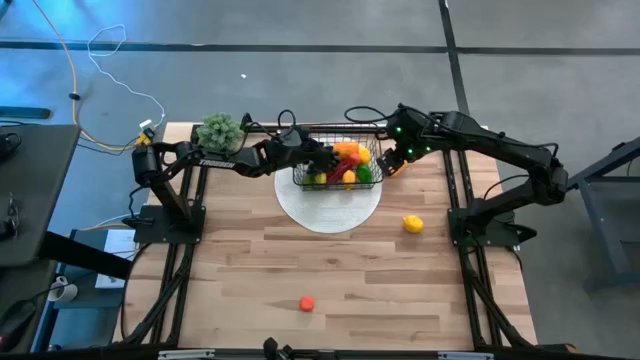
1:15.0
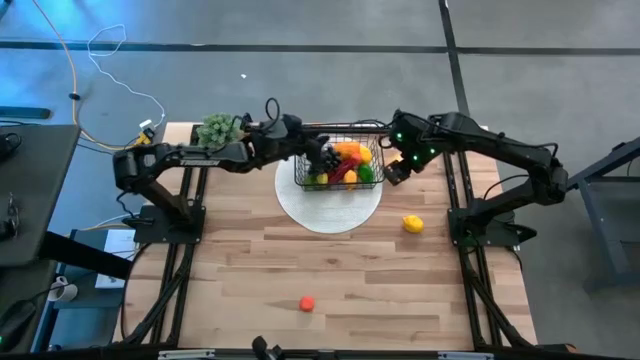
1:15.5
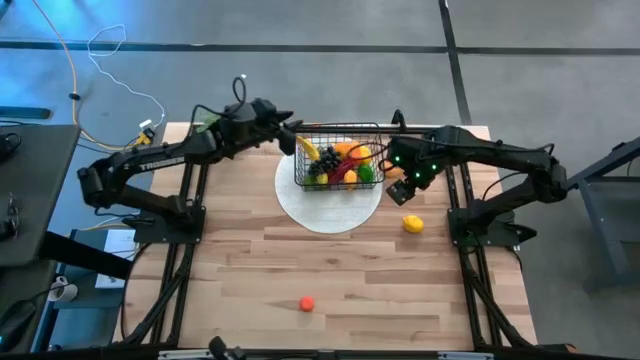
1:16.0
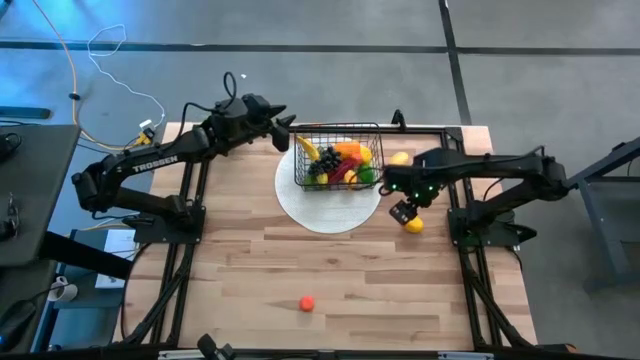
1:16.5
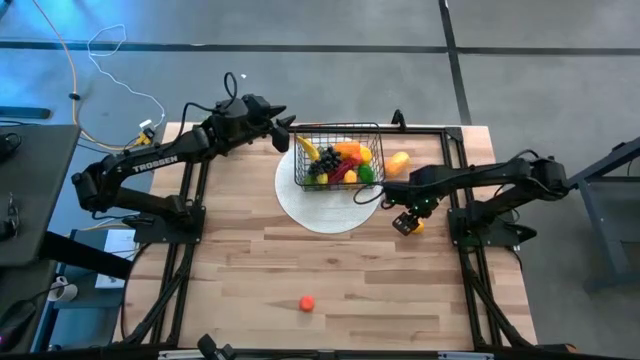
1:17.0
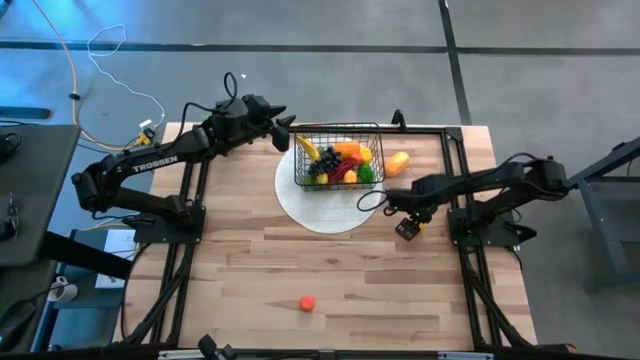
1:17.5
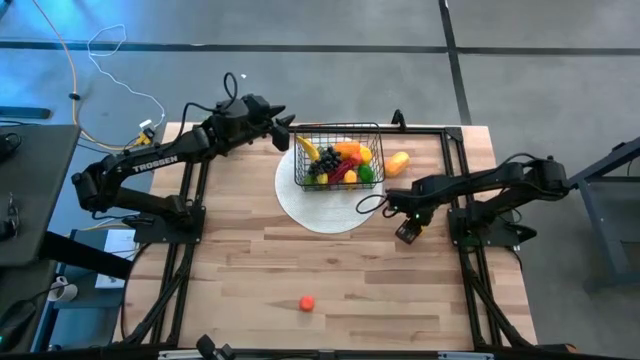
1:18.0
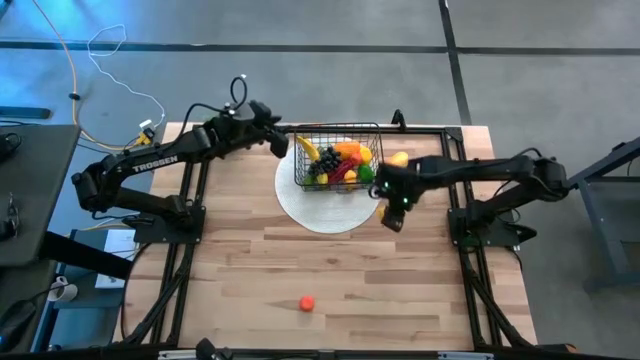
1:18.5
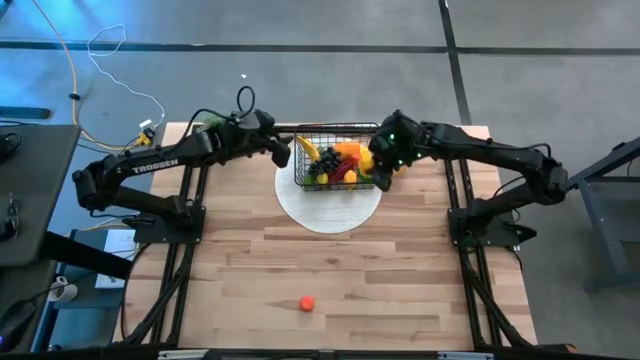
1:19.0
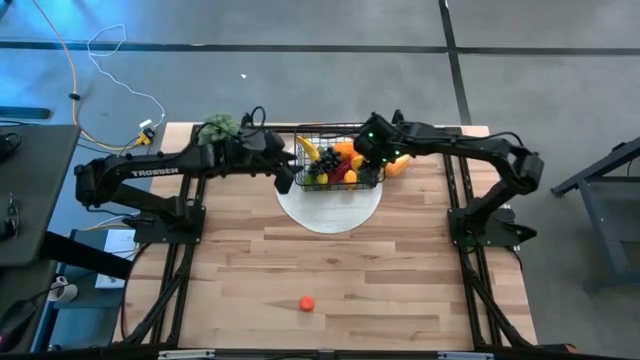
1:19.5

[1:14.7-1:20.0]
Task: Build produce basket
Put the yellow lemon into the black wire basket

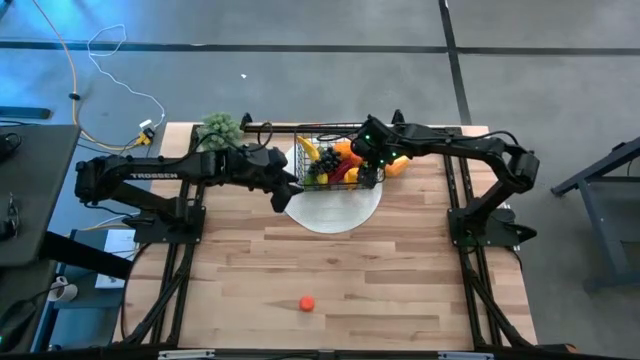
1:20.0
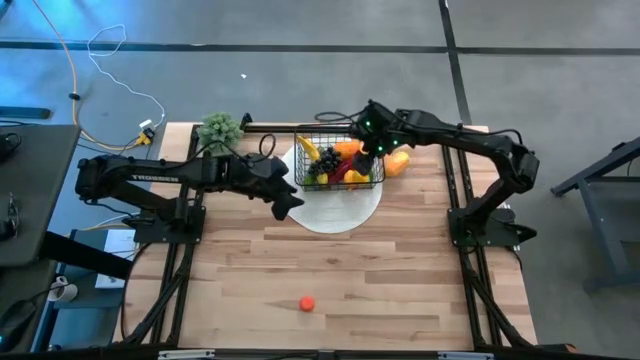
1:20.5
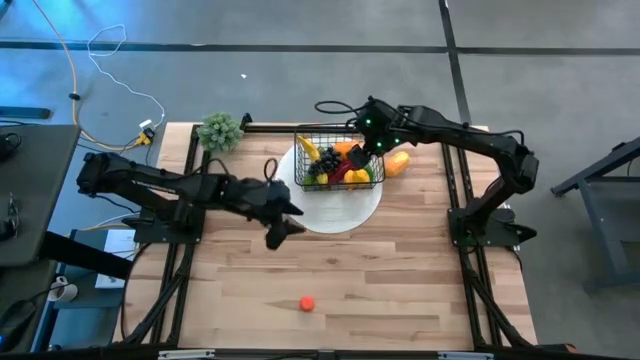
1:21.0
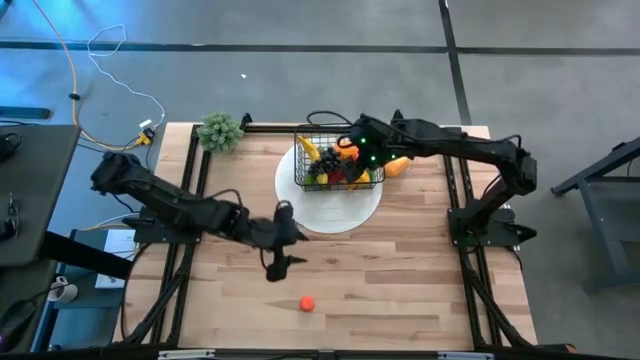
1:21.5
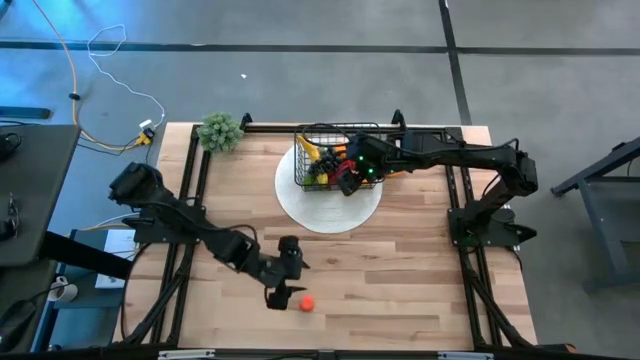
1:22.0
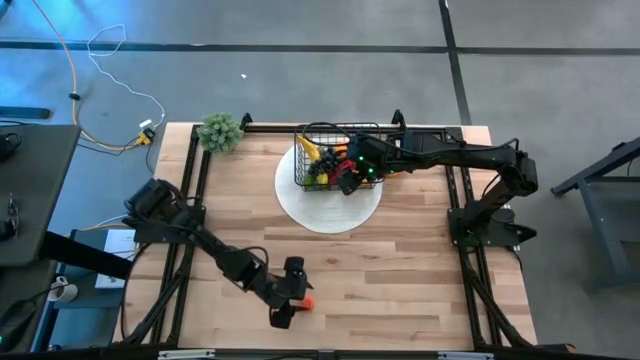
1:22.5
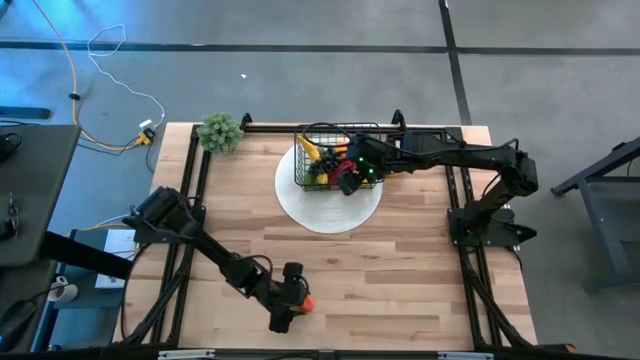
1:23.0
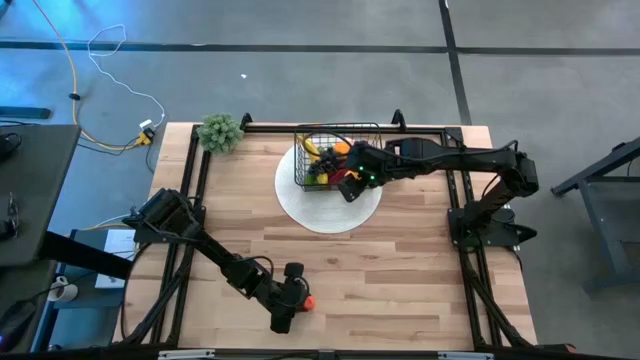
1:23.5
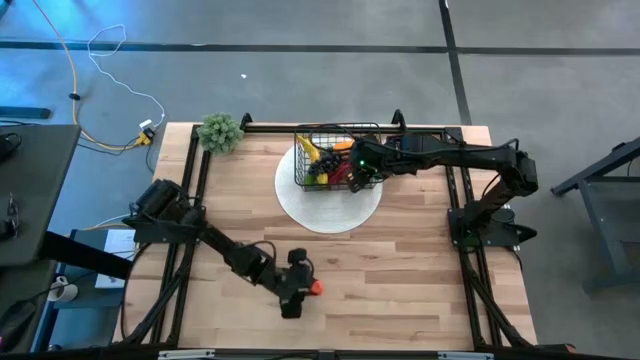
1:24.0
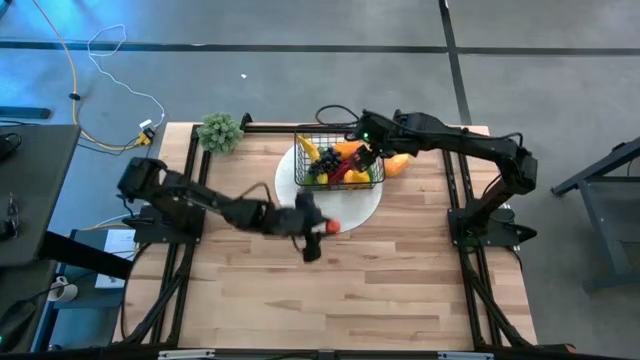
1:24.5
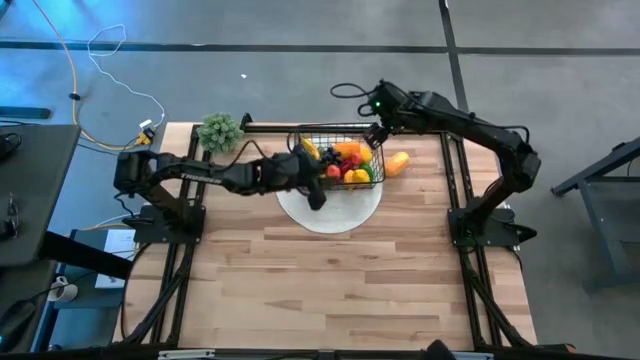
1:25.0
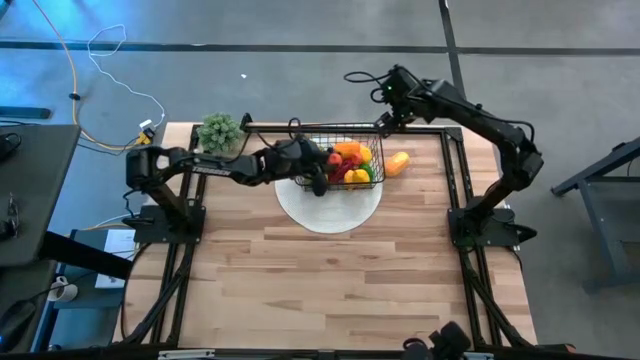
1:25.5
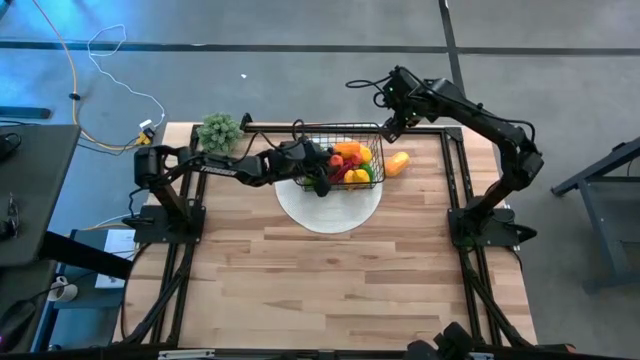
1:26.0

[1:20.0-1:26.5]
Put the orange into the black wire basket

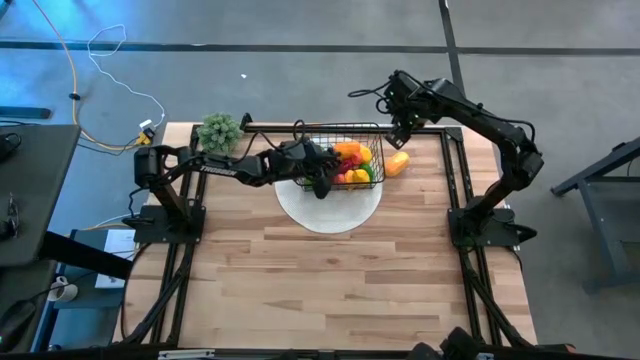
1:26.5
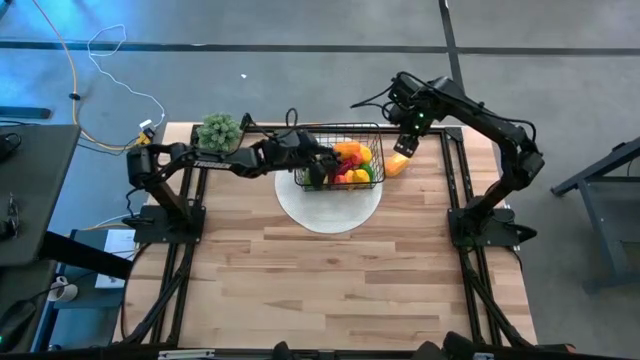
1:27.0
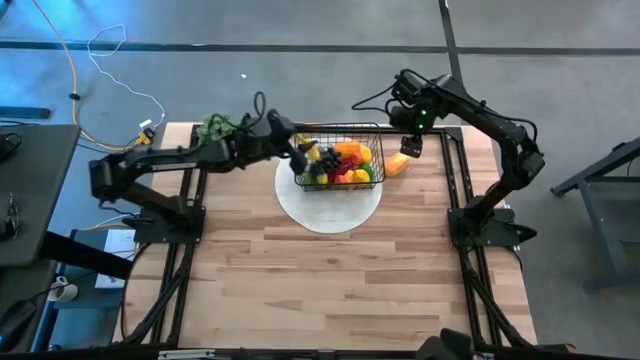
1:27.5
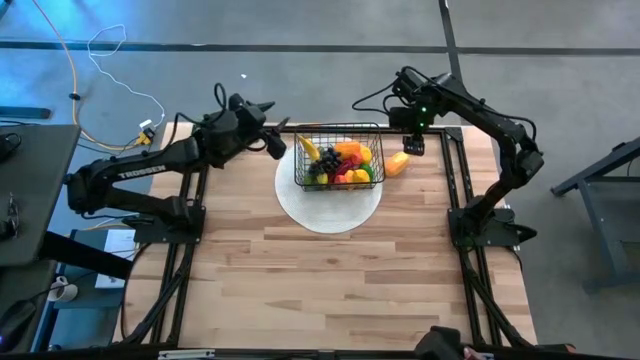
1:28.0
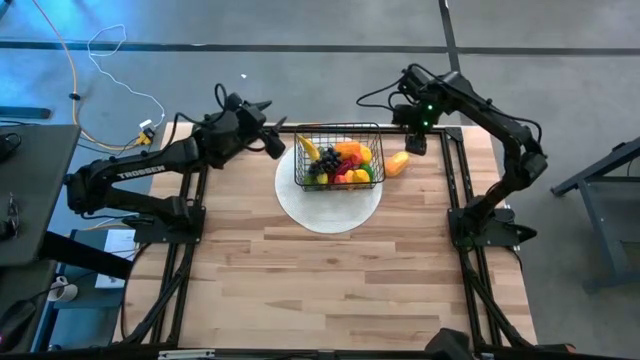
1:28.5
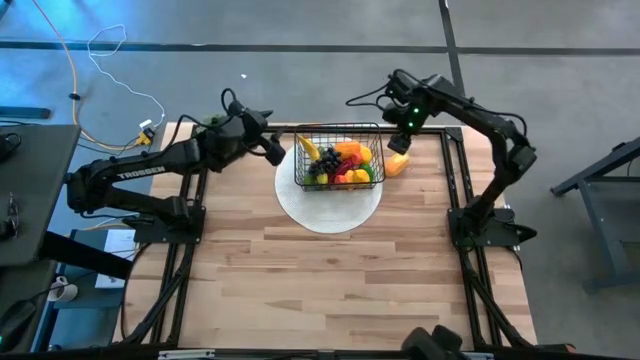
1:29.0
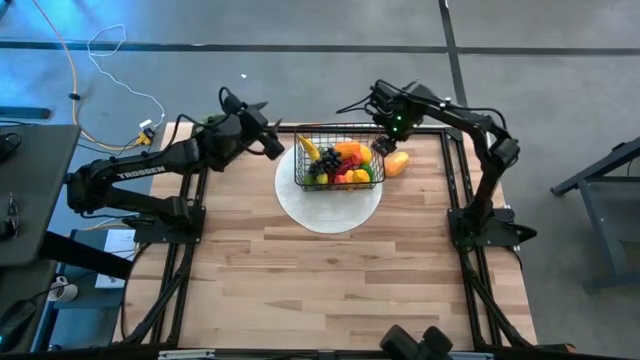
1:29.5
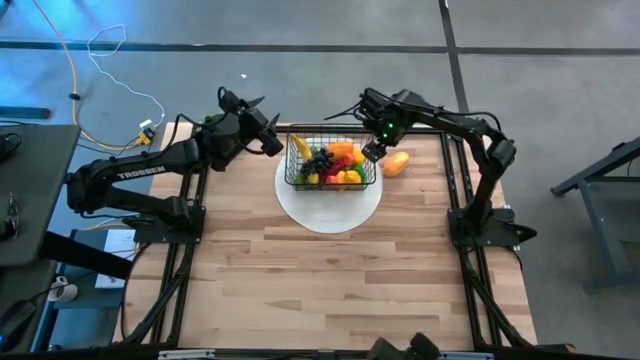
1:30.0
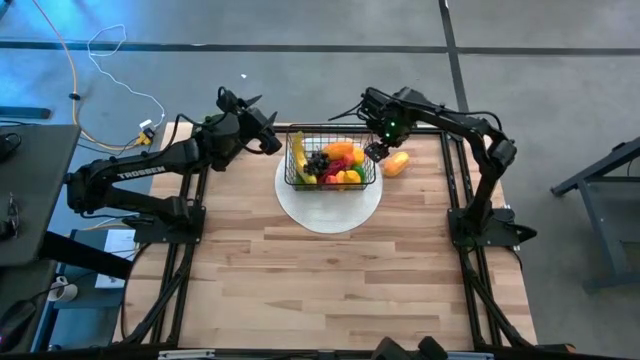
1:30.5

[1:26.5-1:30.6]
Adjust the black wire basket

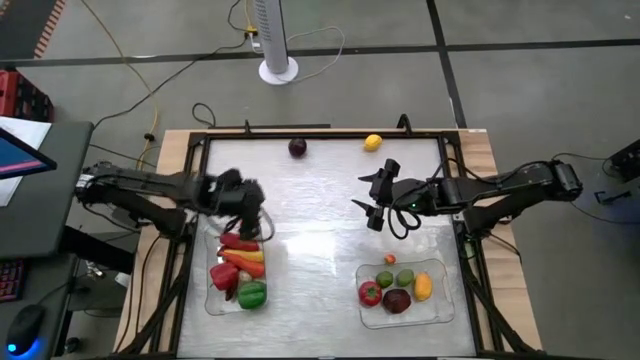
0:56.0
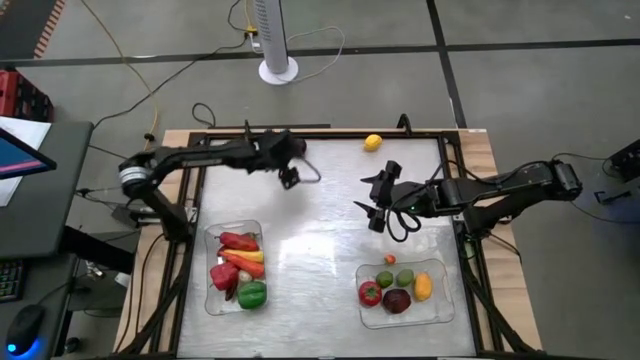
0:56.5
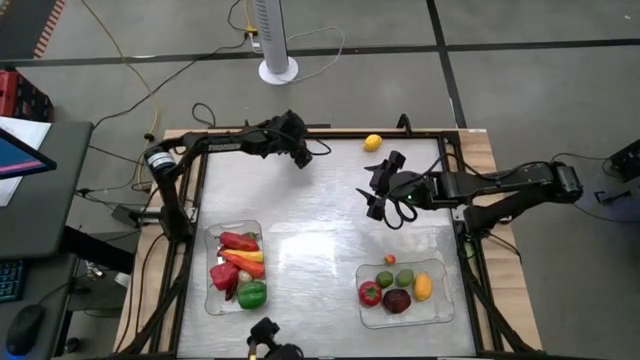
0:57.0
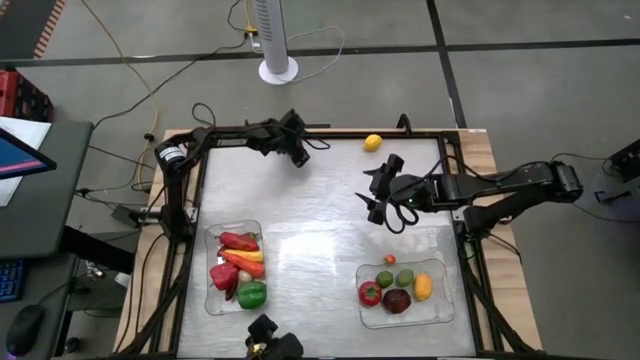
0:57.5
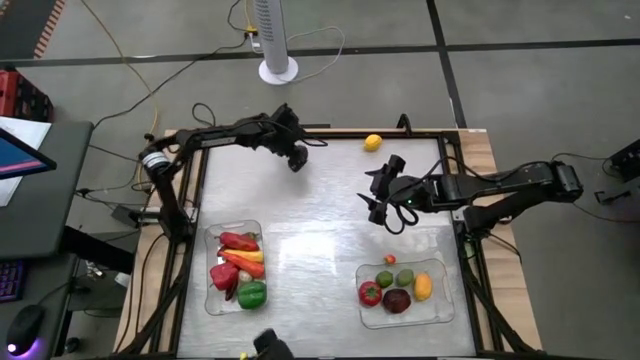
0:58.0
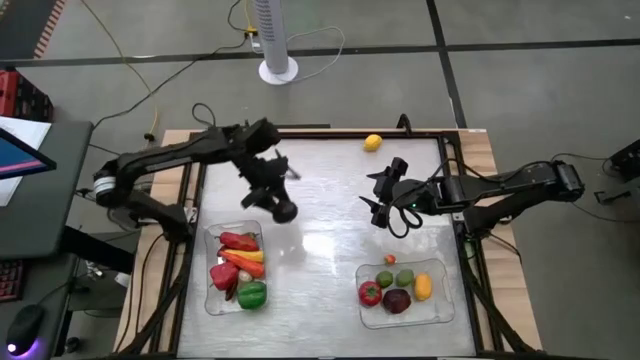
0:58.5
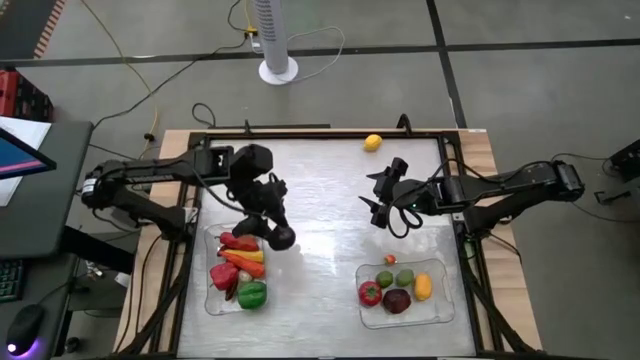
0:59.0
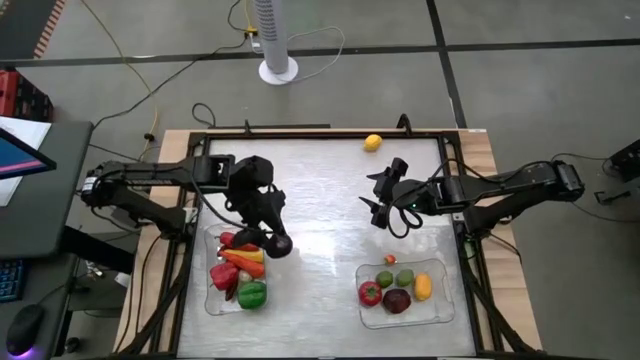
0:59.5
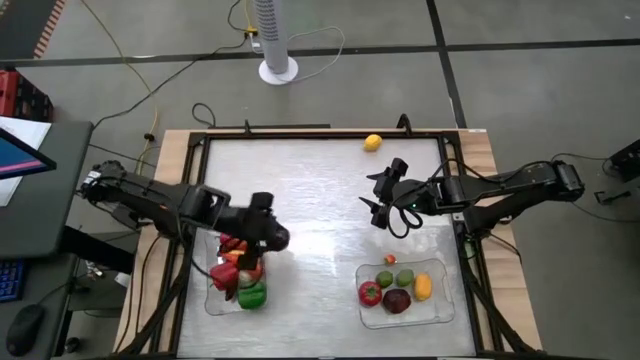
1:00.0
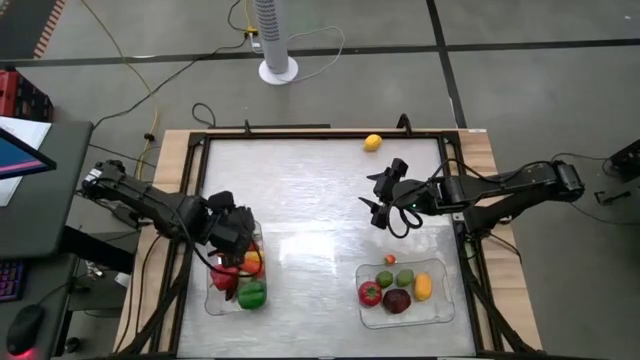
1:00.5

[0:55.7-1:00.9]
Task: Sort produce into baskets
Put the plum into the left transparent bin
